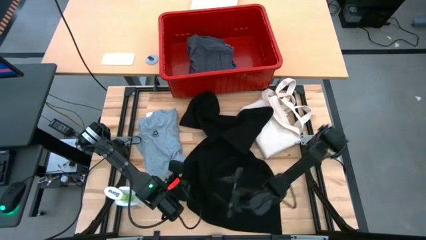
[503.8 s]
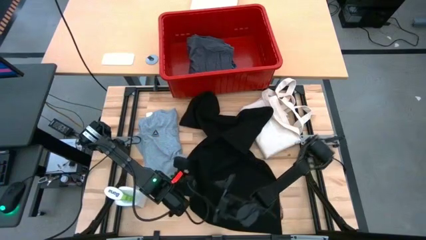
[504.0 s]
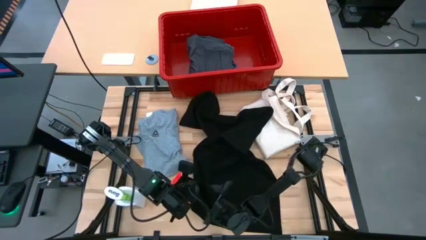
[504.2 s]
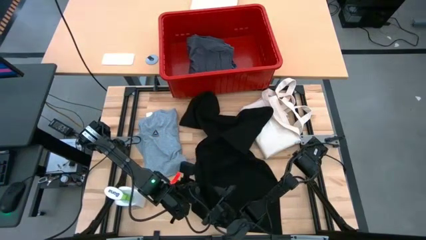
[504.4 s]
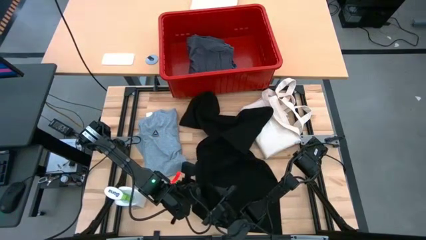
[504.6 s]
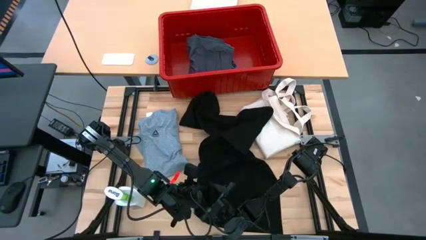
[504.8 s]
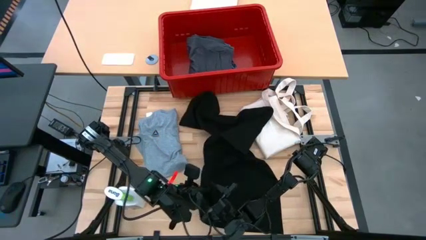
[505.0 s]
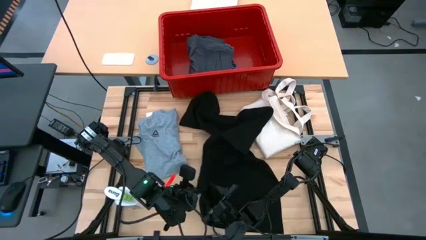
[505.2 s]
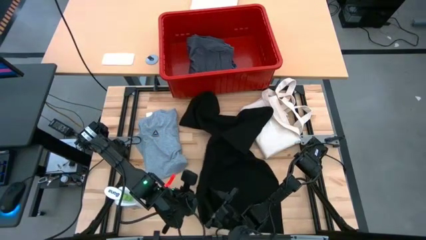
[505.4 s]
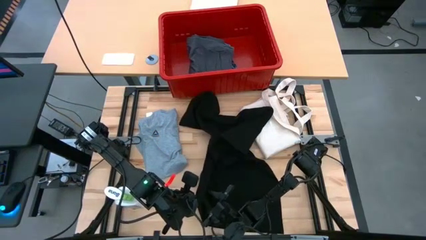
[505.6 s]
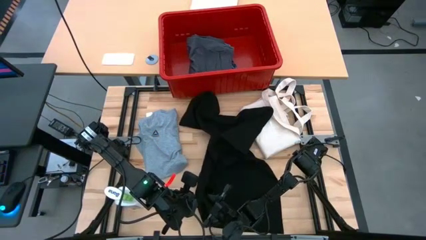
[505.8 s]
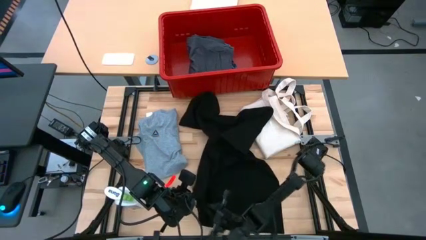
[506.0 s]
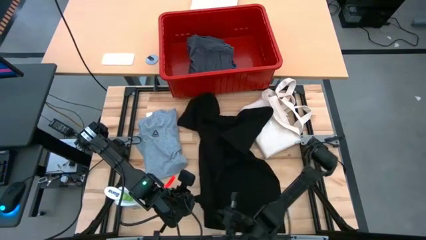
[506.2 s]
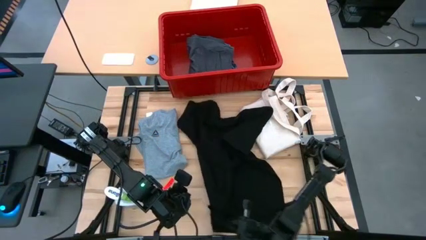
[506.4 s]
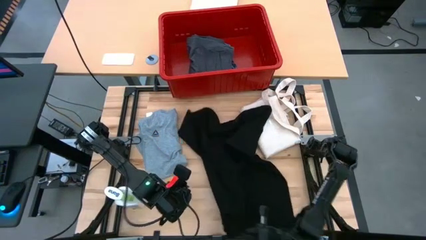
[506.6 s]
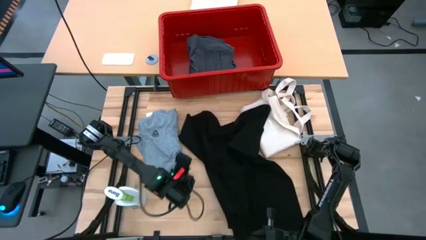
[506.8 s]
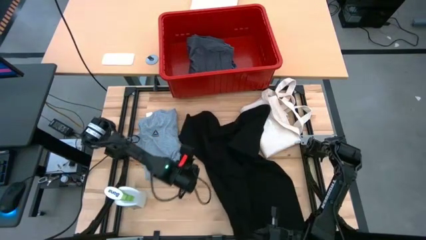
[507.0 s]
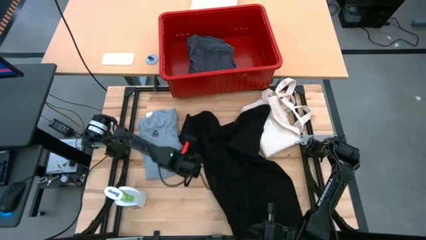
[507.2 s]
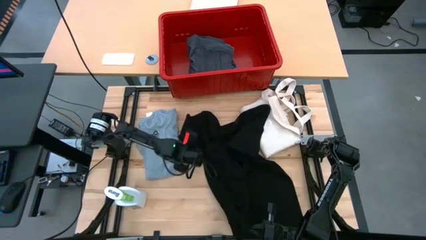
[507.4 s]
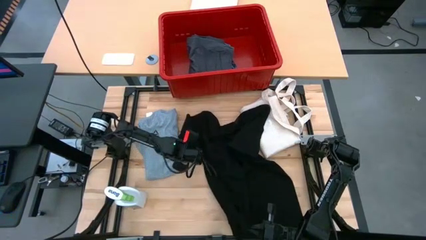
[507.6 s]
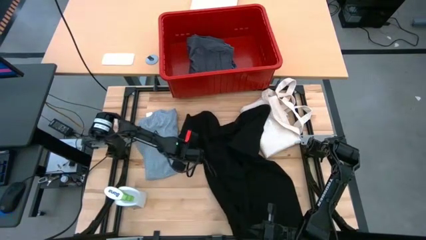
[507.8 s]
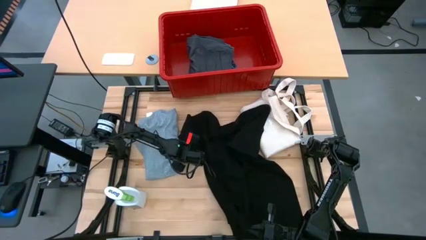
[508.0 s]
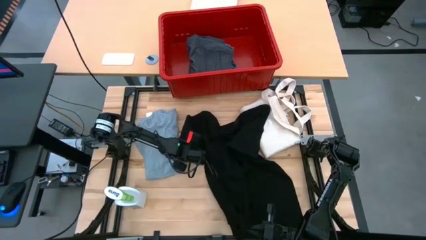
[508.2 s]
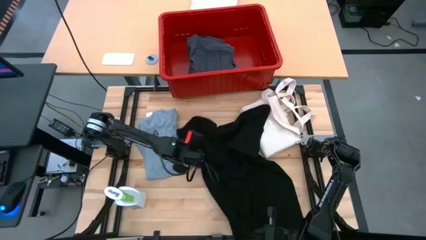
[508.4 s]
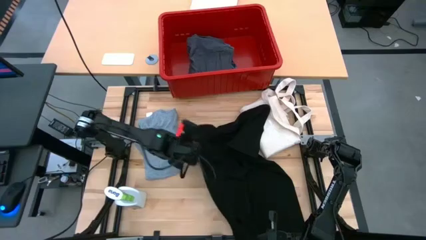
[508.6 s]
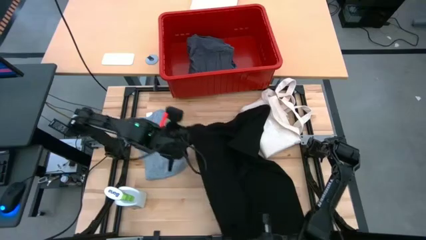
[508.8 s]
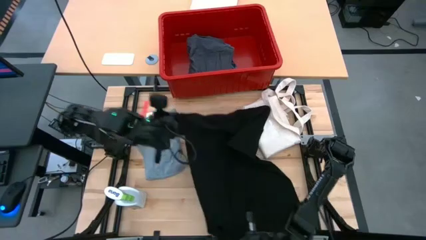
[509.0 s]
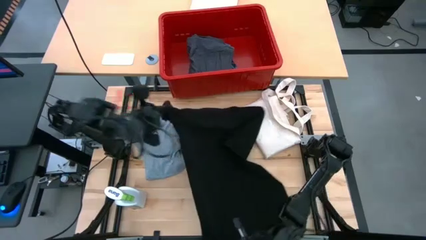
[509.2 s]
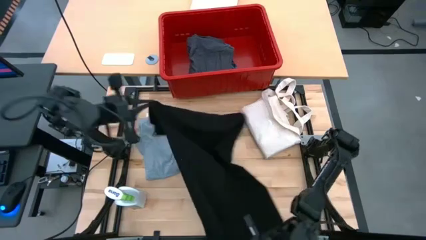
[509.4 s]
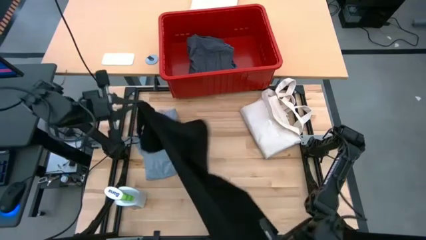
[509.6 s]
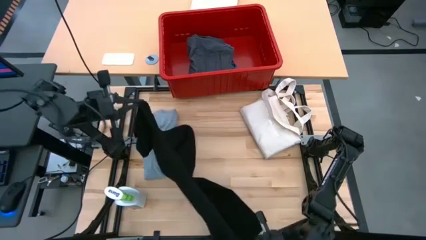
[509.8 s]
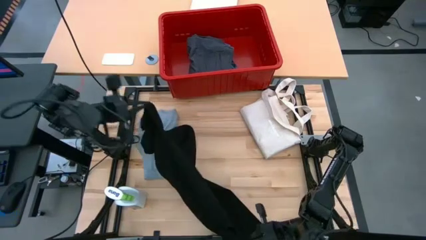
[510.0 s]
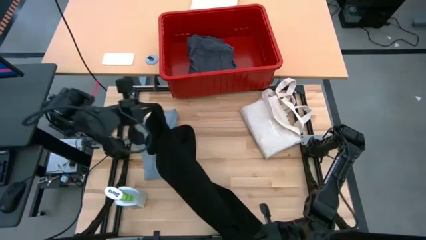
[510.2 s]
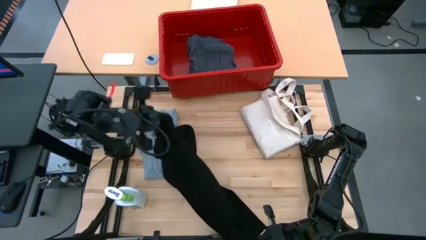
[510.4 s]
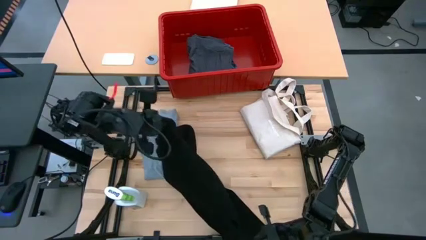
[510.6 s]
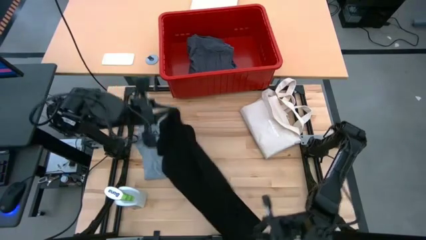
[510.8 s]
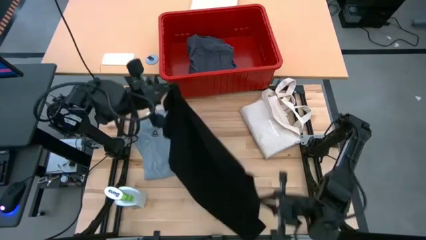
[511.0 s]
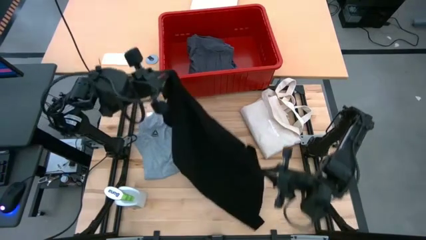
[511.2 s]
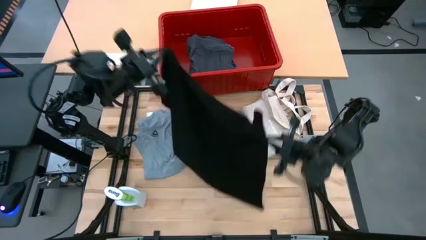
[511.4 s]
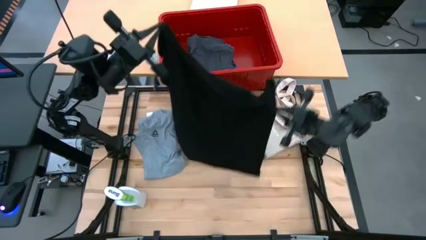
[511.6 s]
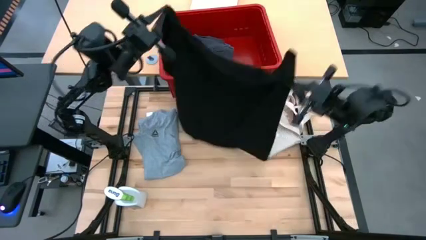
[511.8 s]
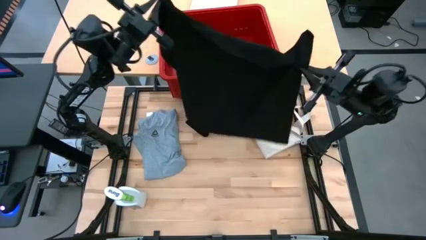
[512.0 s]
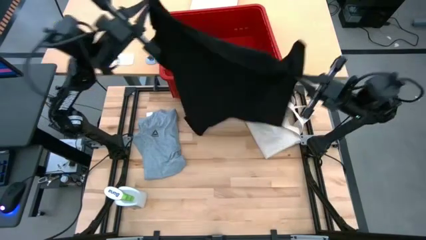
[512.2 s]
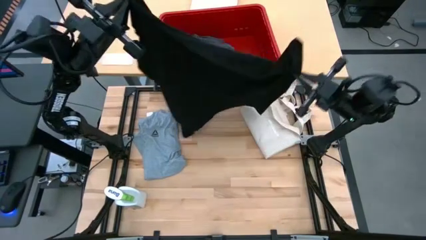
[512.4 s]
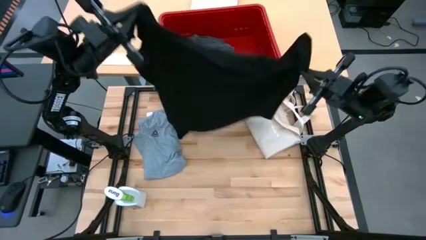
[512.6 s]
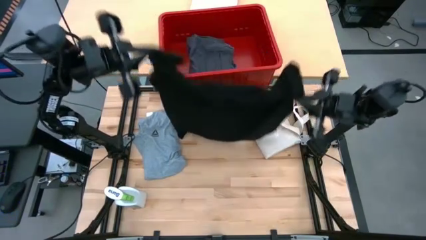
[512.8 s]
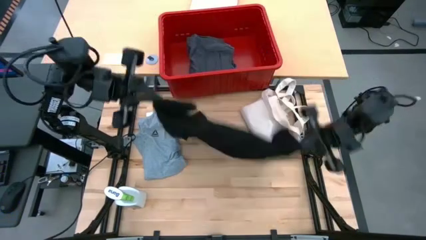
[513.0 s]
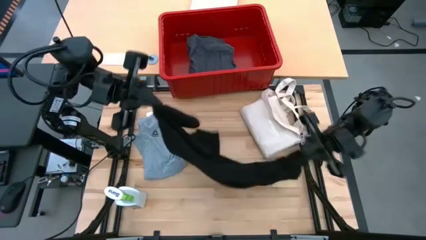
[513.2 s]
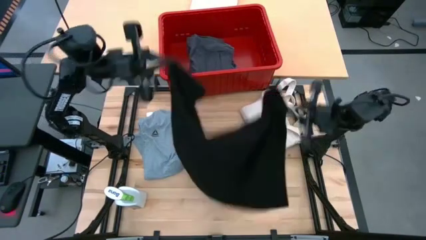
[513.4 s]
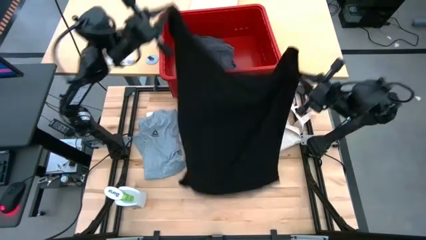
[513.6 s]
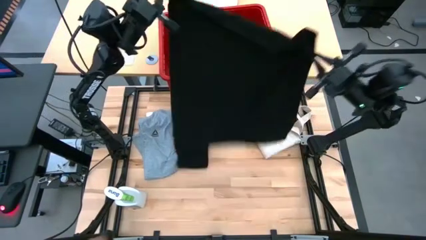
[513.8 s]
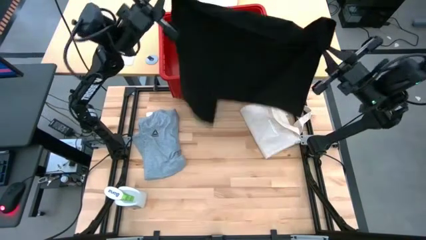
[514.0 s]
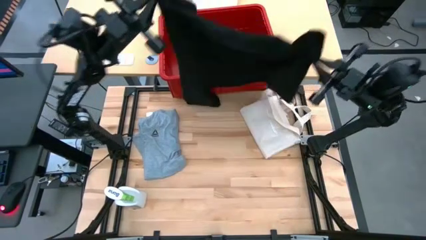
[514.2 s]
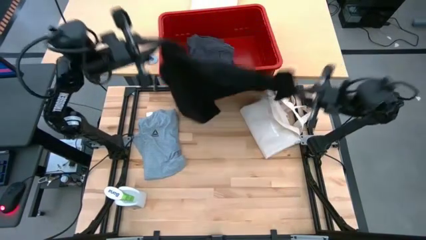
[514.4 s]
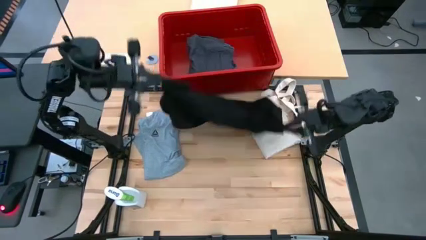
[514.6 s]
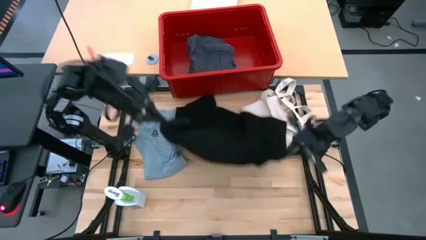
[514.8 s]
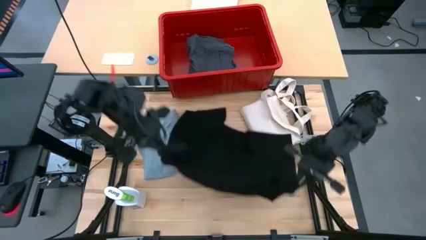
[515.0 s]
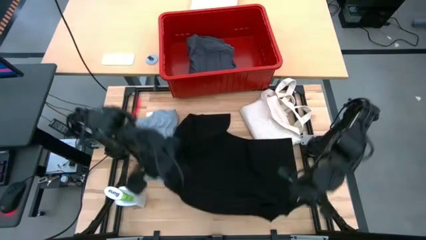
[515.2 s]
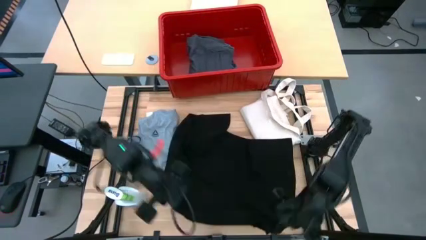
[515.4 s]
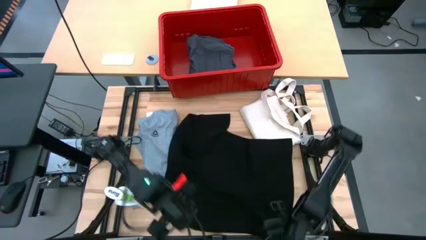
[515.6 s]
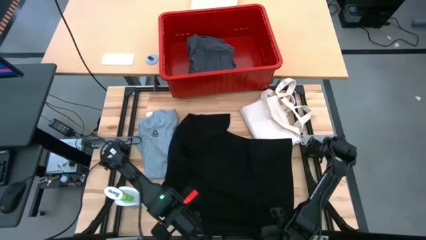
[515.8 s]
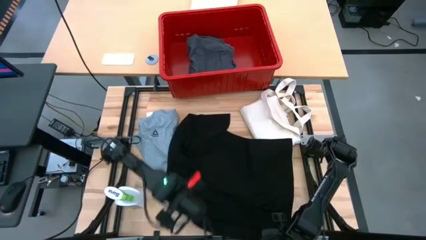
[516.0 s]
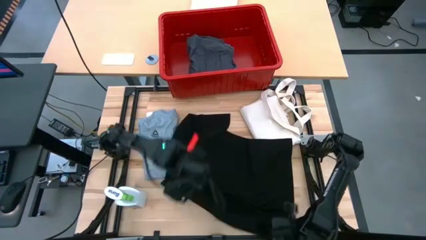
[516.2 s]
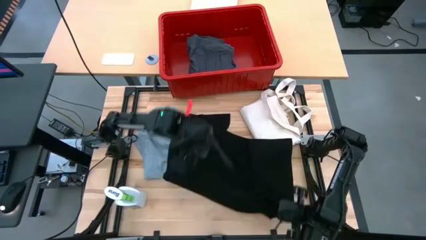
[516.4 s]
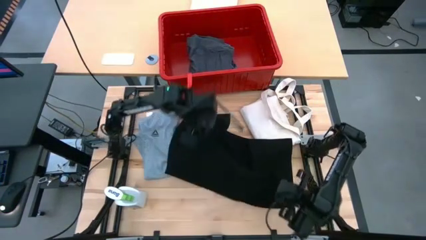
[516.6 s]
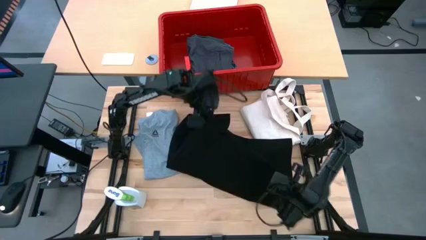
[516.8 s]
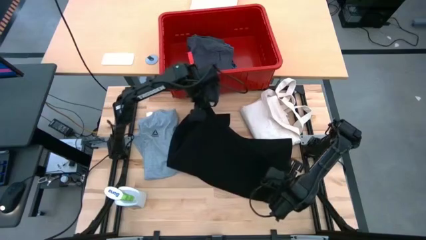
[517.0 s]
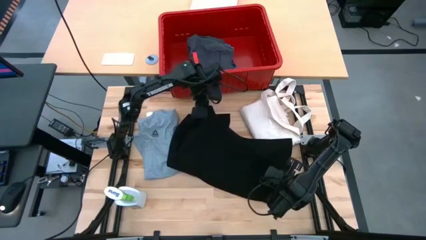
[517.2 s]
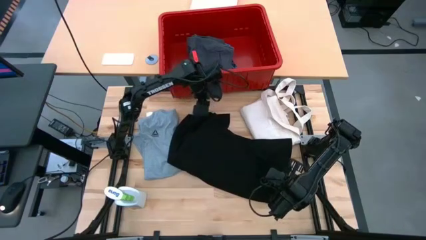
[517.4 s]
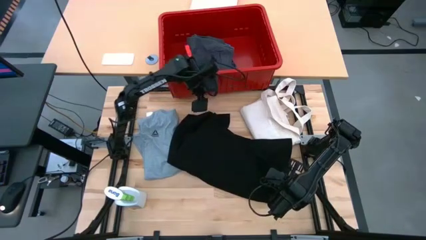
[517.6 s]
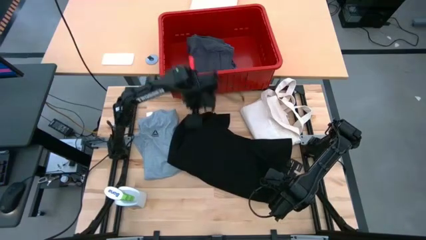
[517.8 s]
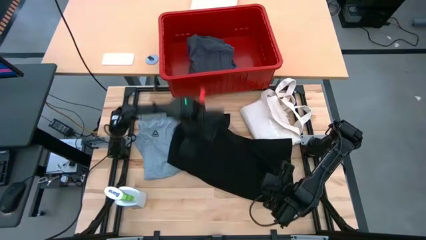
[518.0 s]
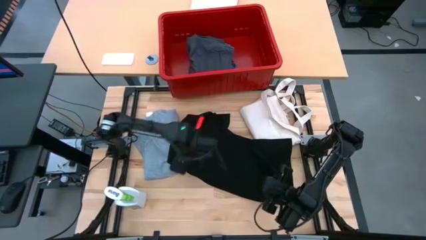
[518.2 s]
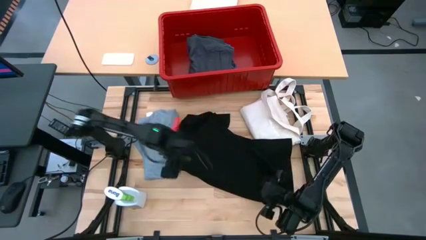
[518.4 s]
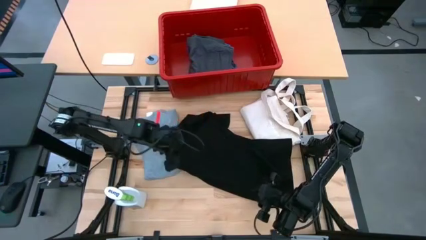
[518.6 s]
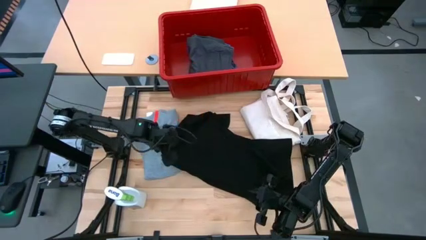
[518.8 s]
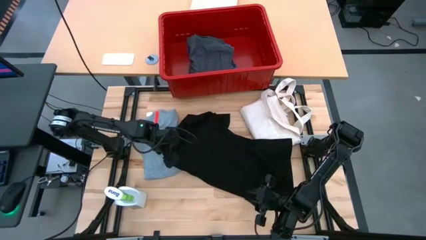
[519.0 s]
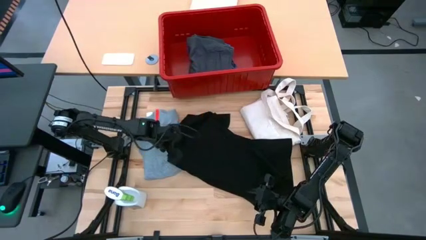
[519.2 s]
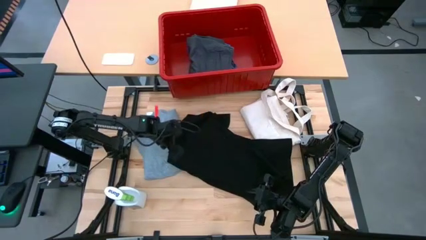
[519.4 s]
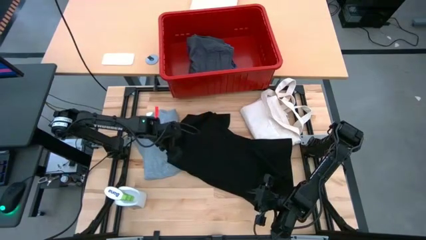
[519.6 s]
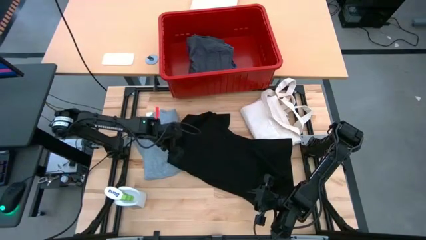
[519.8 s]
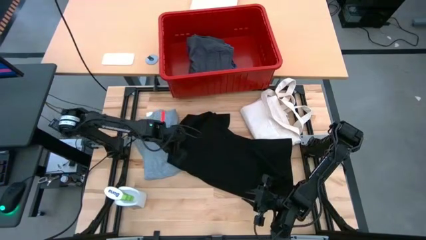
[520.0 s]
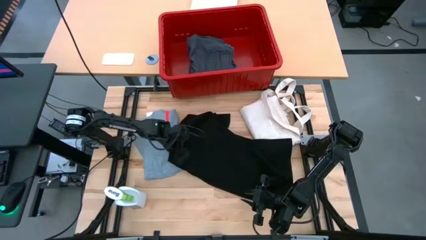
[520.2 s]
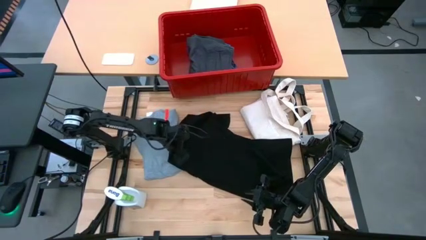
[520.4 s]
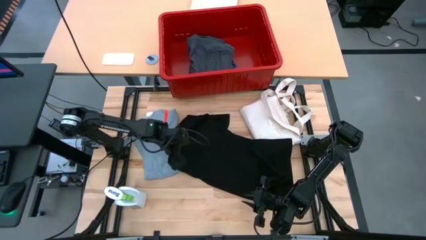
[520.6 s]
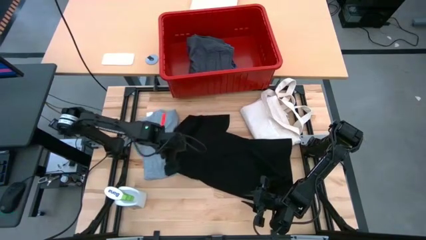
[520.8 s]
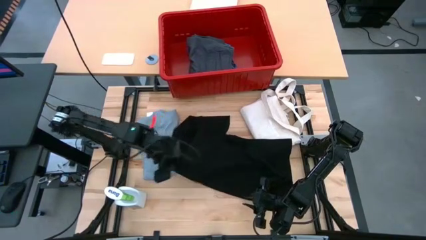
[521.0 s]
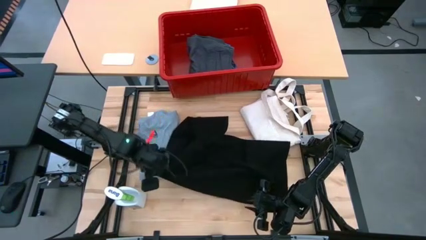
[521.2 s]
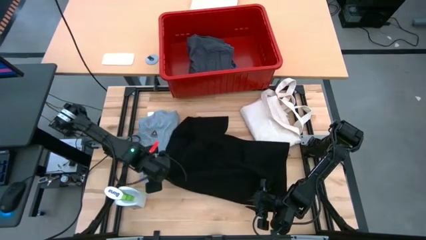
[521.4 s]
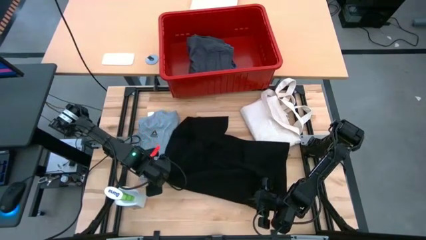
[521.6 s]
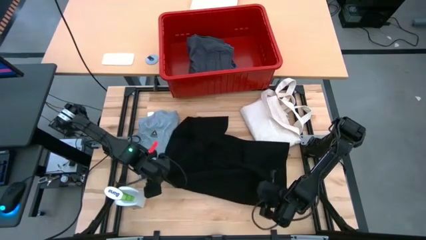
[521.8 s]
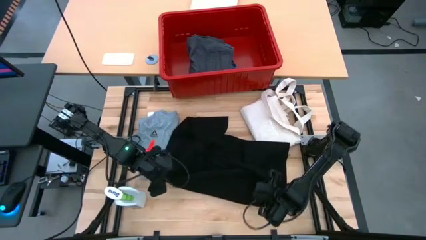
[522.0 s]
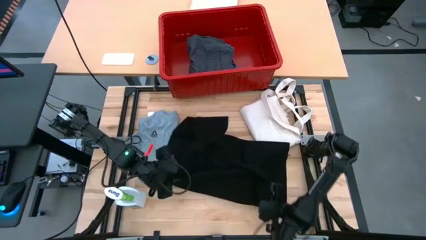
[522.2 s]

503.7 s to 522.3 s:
Task: Fold Laundry from Bin
Fold the black shirt
